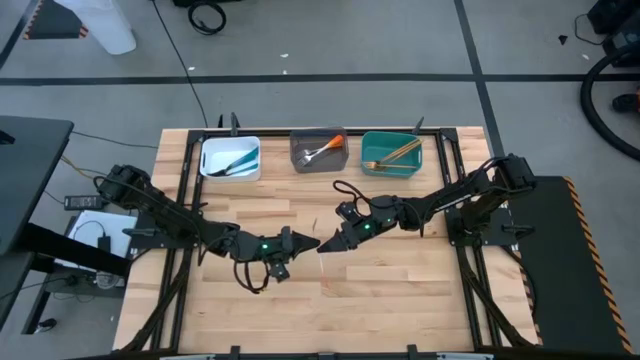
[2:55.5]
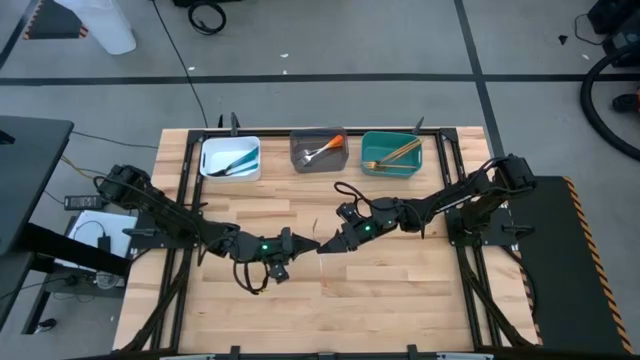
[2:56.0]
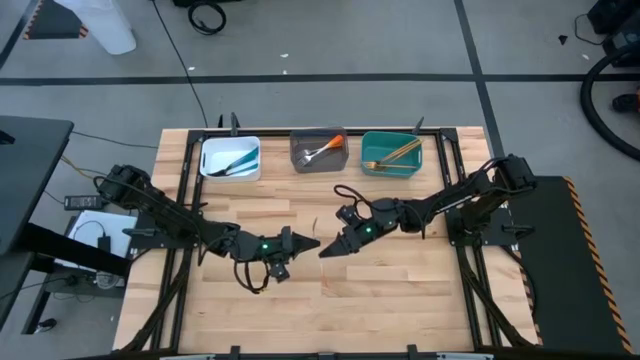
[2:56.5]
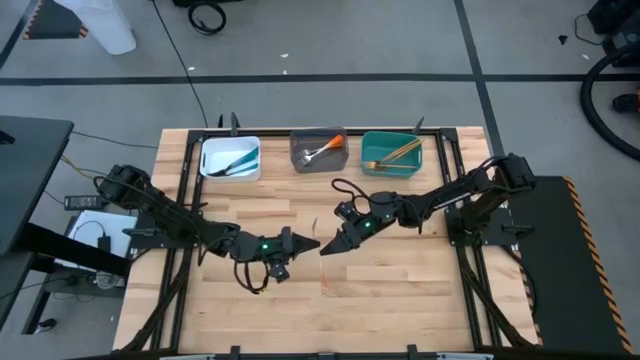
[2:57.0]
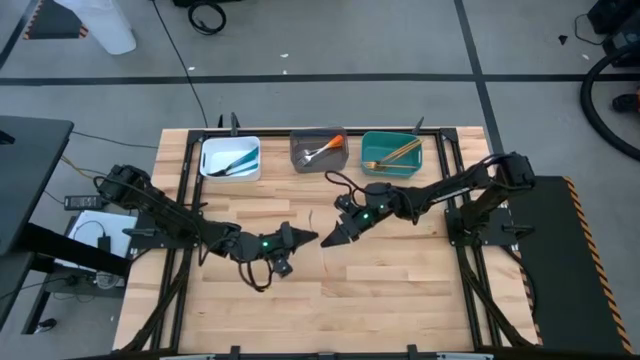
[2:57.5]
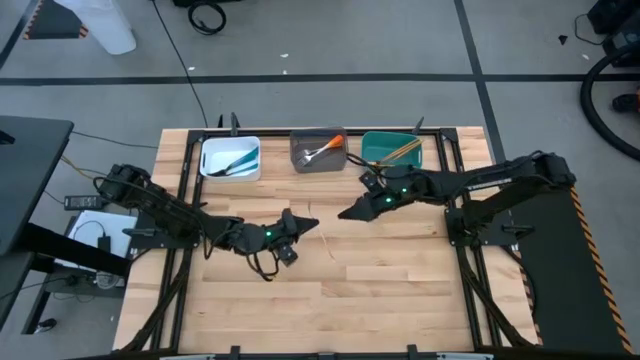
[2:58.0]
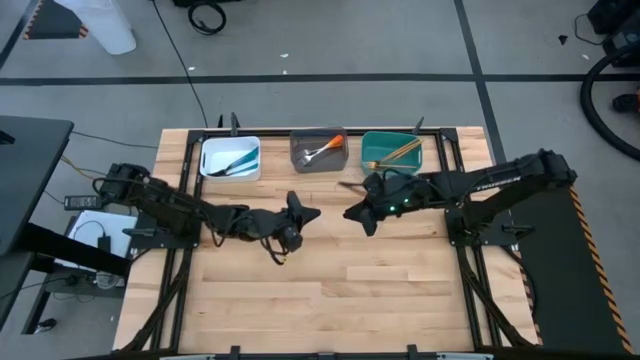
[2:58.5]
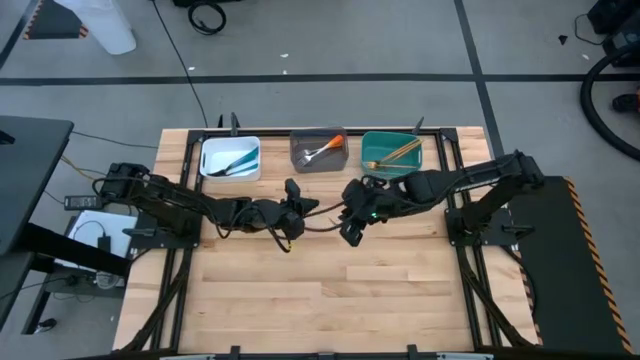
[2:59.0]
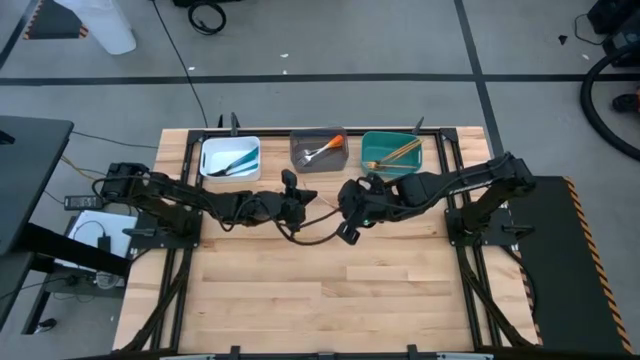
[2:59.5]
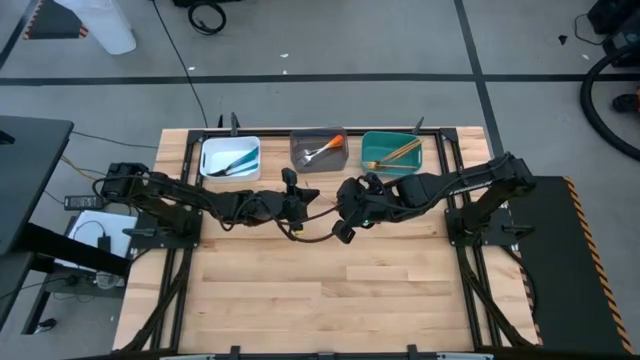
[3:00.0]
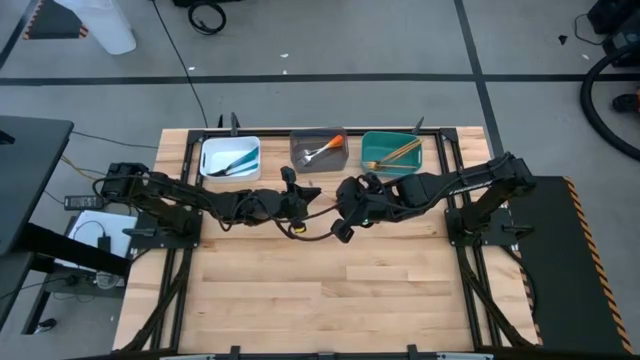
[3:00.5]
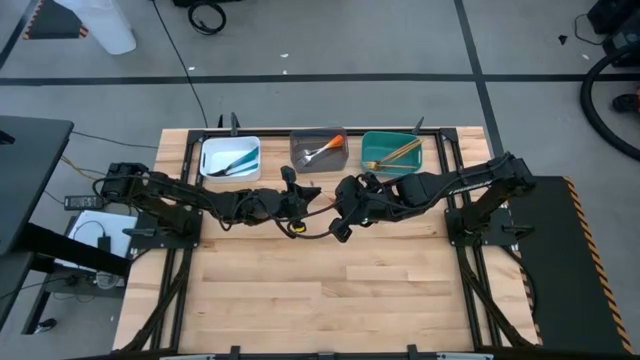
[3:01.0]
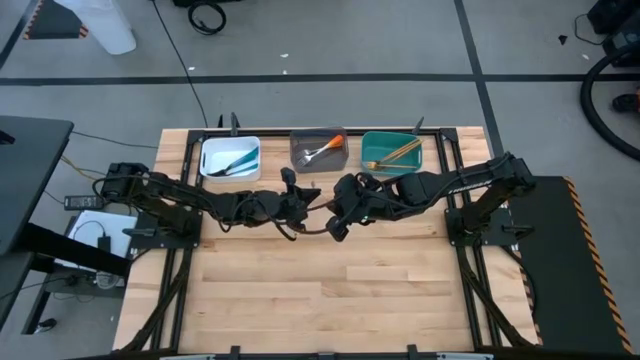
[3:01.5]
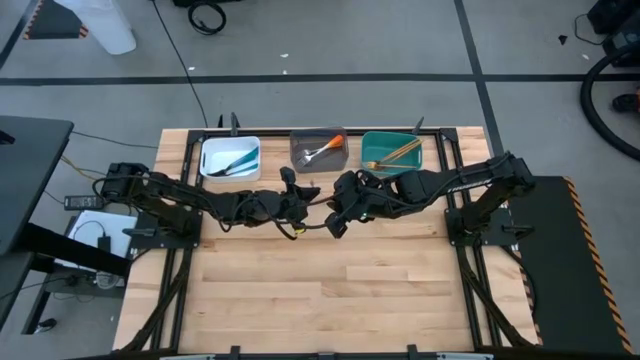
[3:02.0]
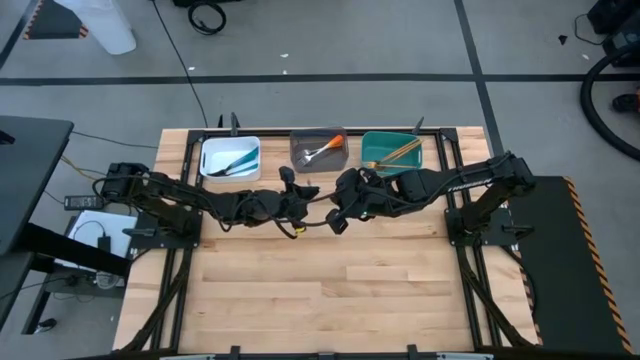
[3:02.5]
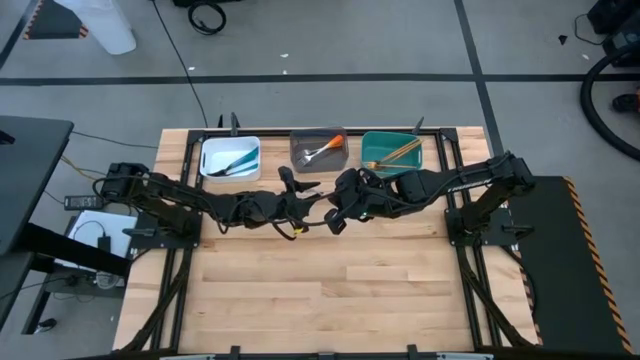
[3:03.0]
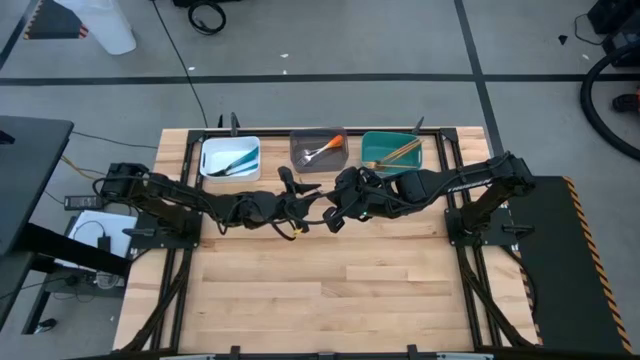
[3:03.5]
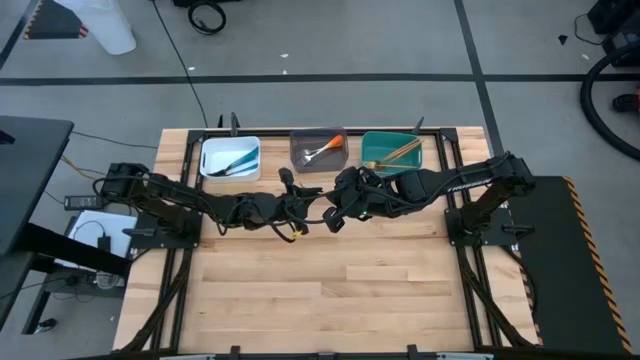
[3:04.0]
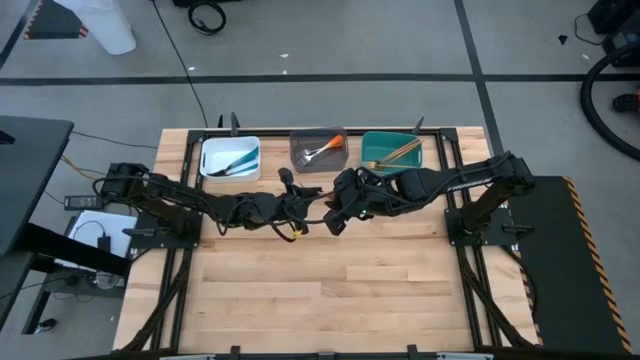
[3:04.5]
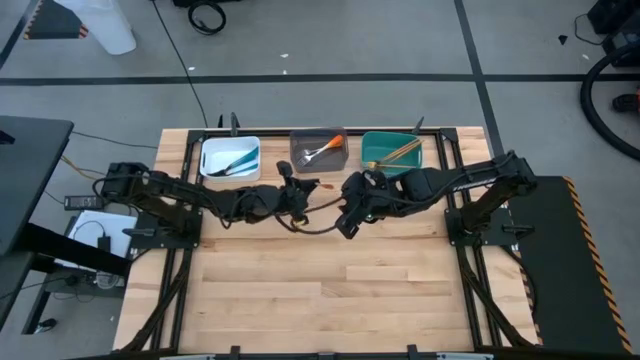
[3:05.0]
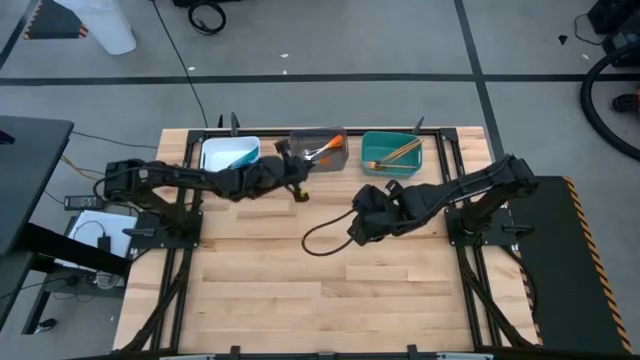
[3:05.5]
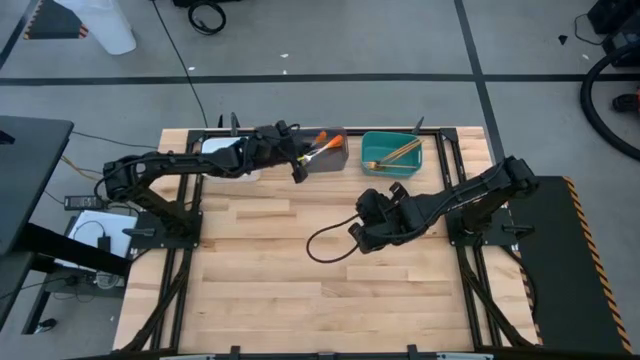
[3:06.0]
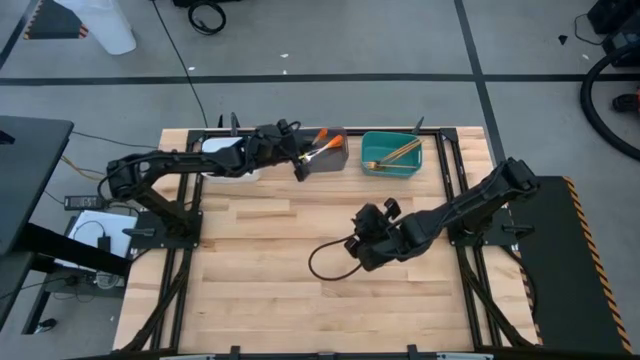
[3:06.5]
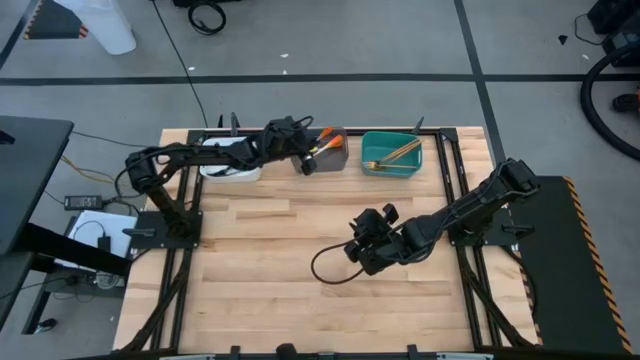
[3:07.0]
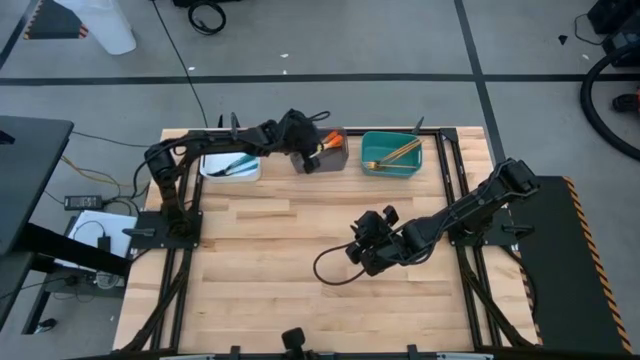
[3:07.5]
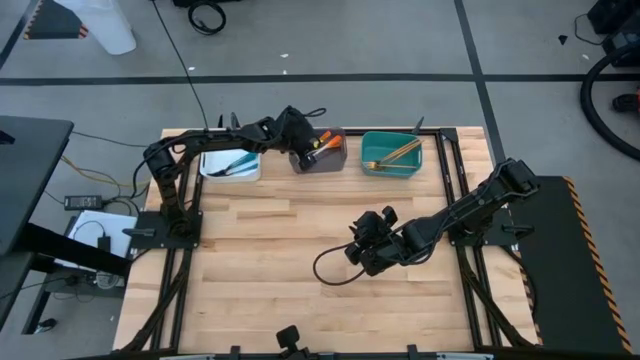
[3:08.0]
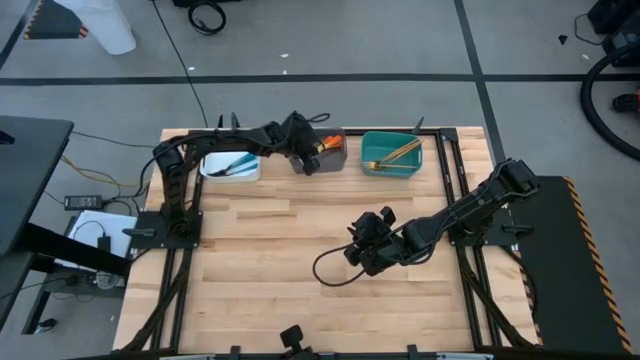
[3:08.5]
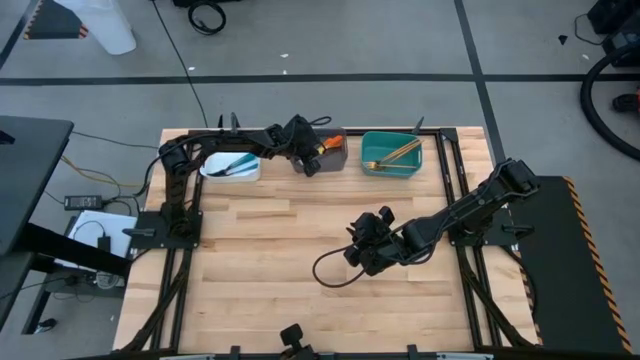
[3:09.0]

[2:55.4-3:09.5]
Task: Sort silverware by color (type)
Put the orange fork into the black bin

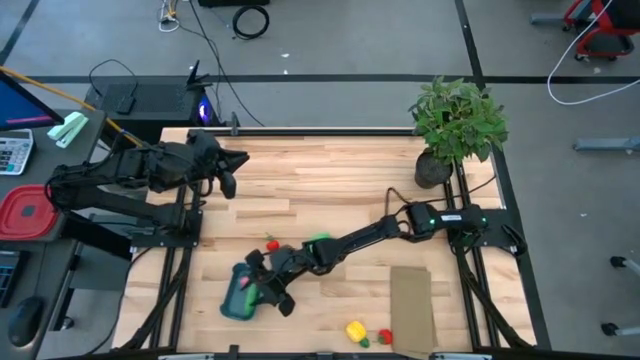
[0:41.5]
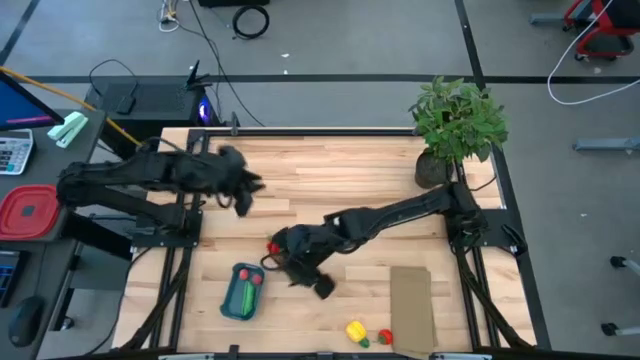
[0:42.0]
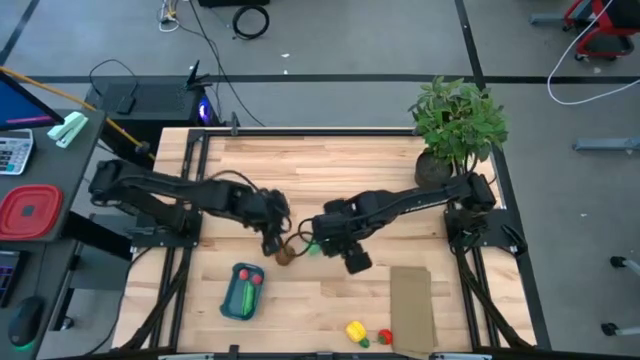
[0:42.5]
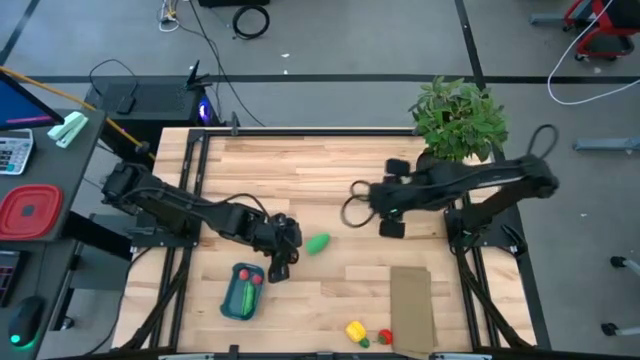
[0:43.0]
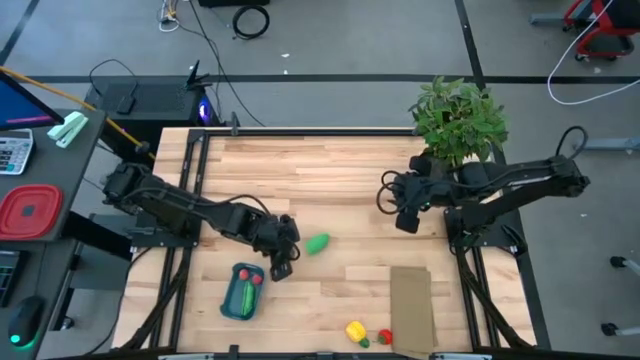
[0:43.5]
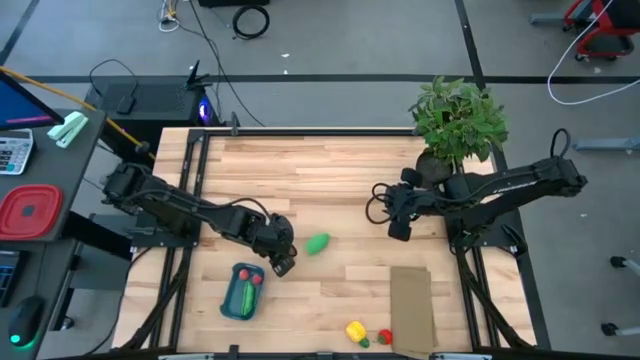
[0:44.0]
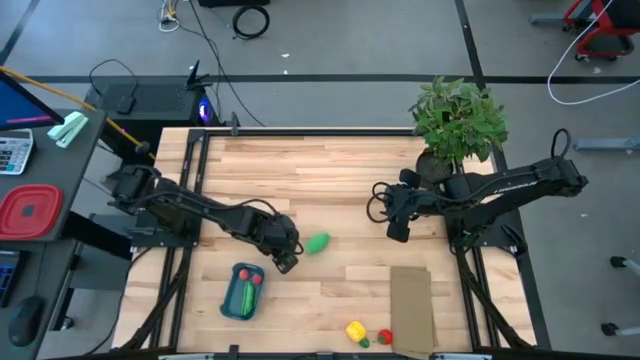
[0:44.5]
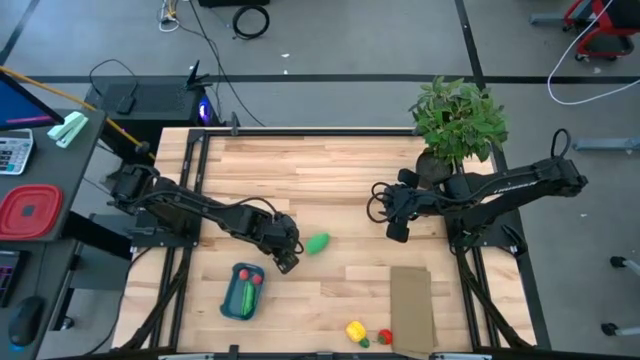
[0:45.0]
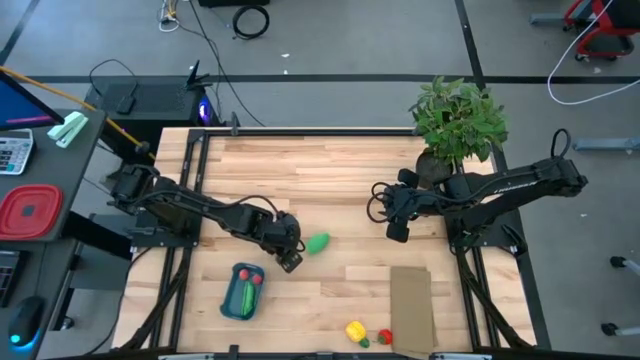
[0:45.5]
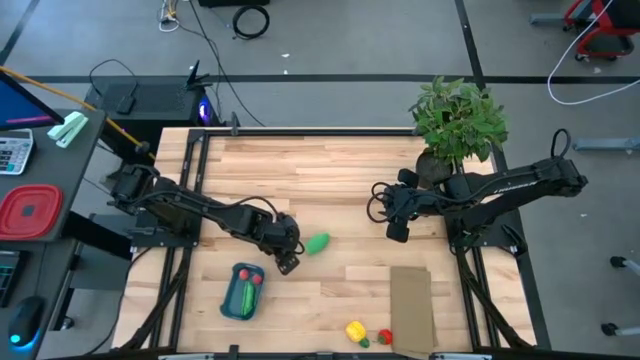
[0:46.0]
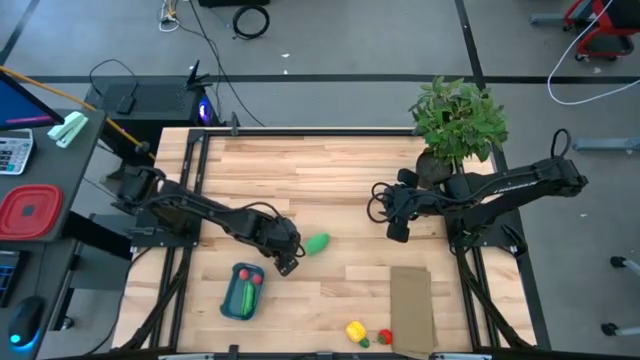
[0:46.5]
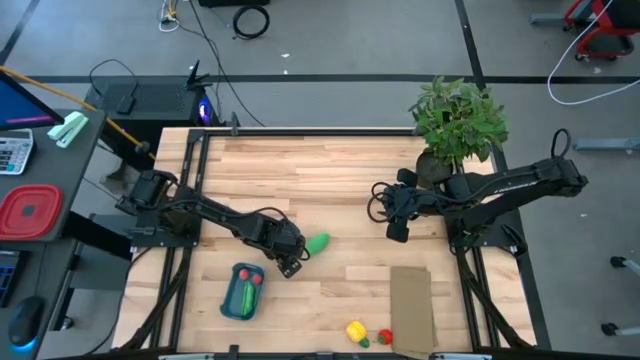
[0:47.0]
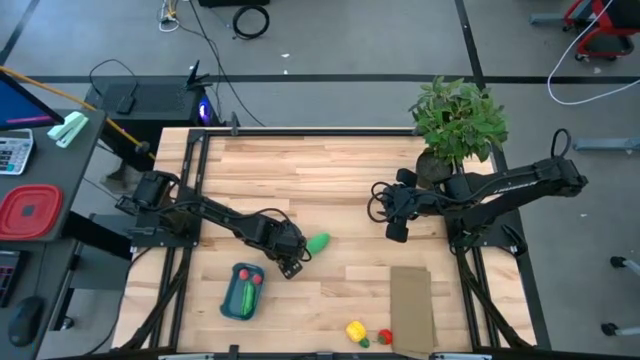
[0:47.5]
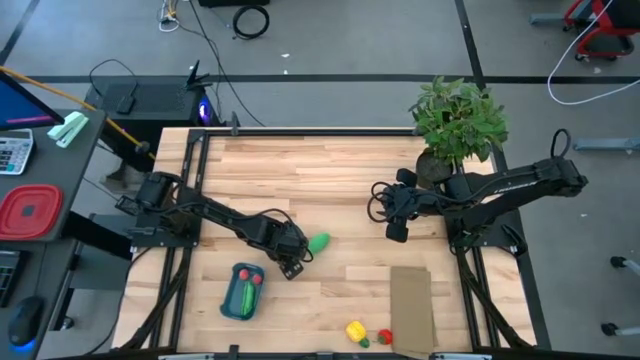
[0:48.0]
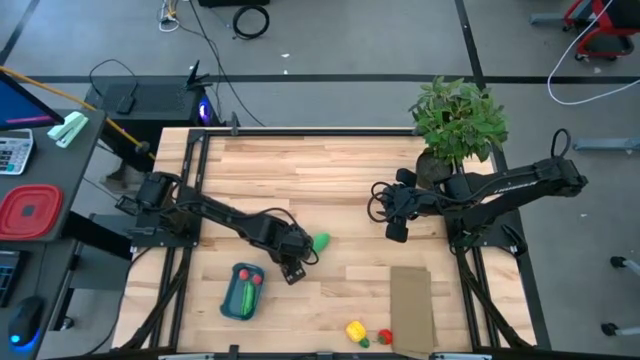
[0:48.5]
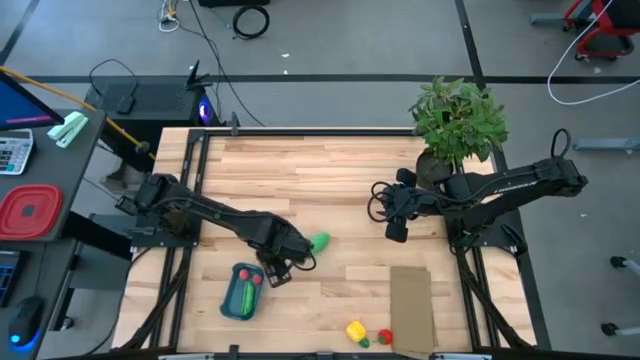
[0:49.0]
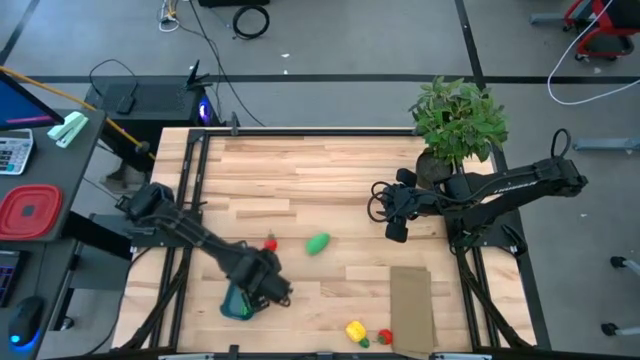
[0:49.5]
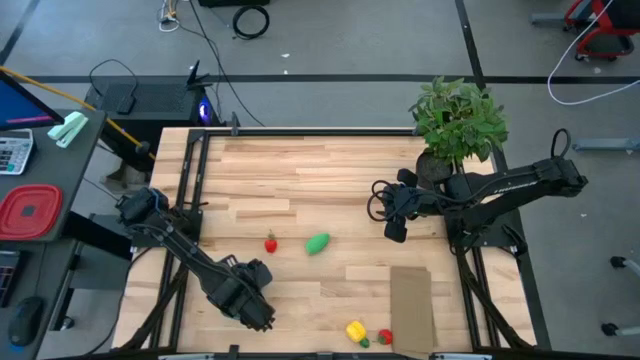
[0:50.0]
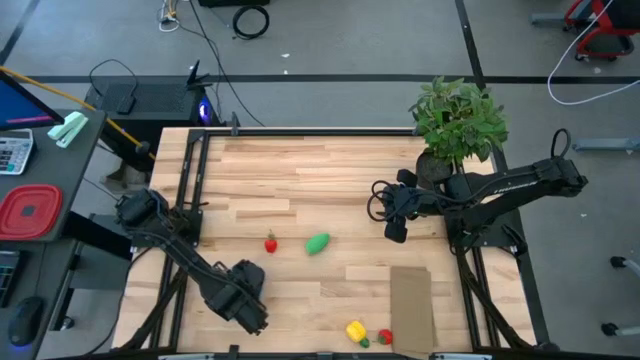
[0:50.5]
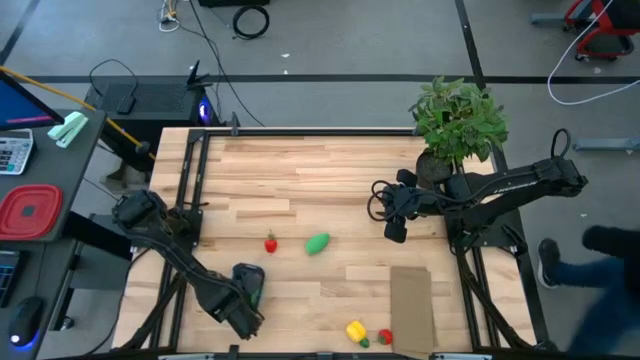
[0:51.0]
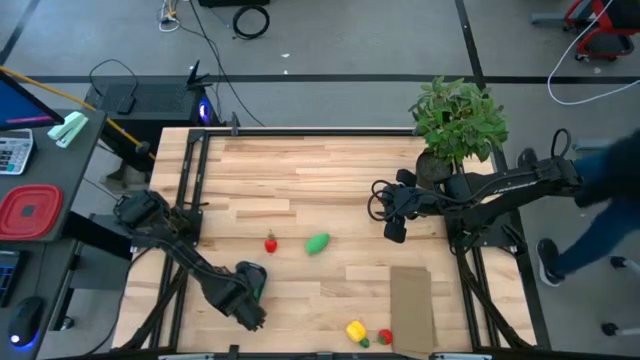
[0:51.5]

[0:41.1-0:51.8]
Task: Pick and placing Produce into tupperware
Put the brown kiwi into the blue bin
